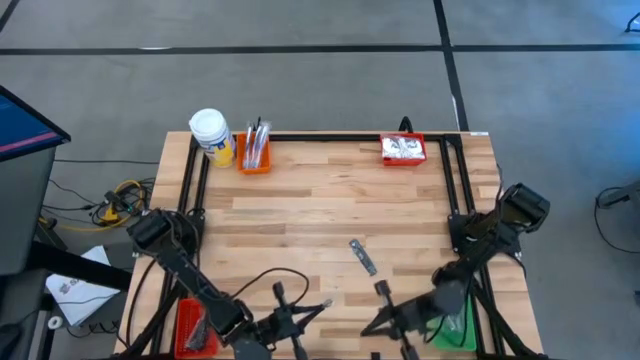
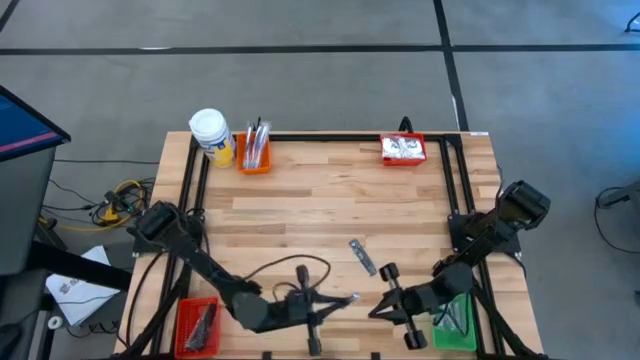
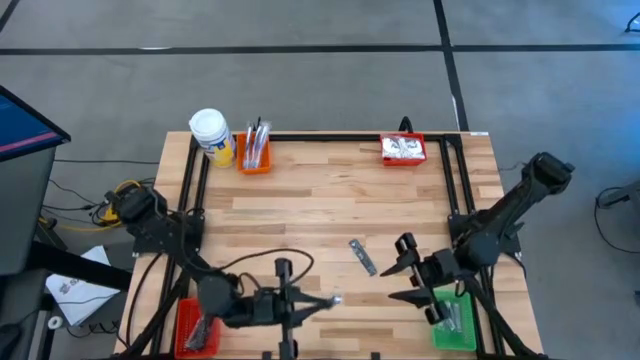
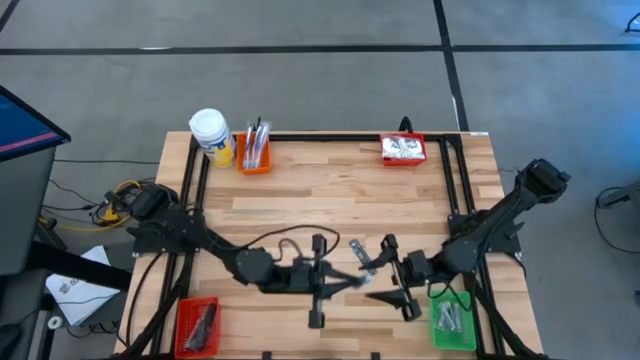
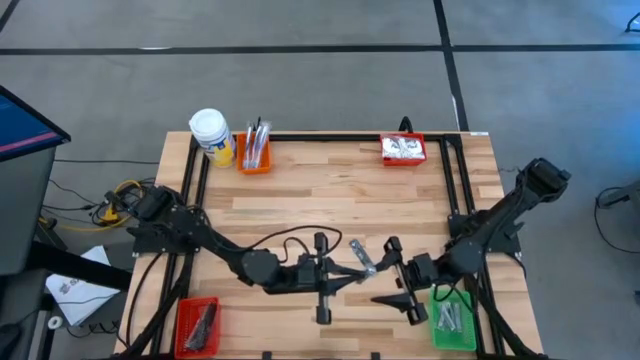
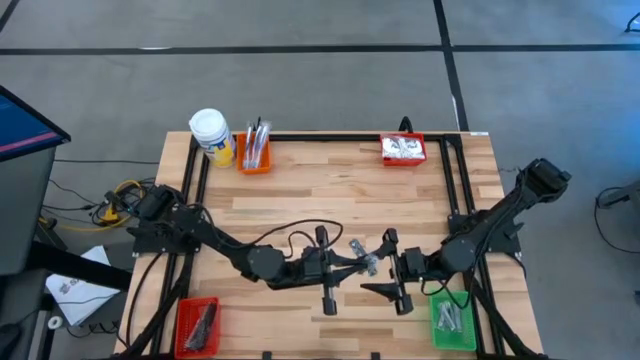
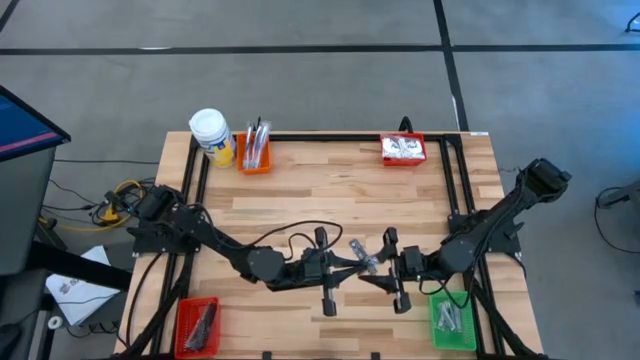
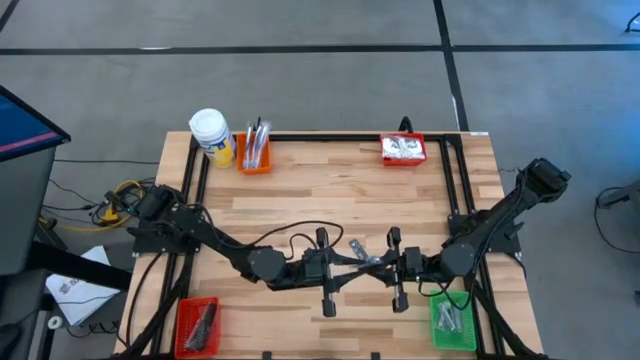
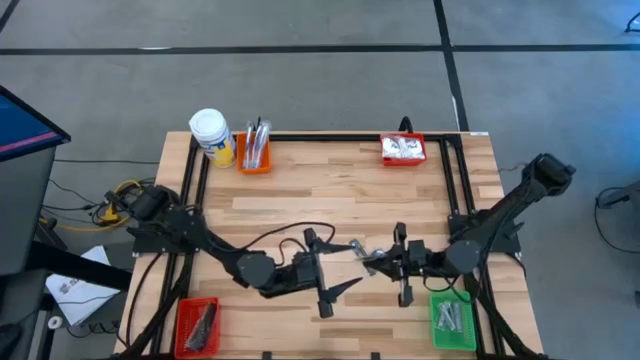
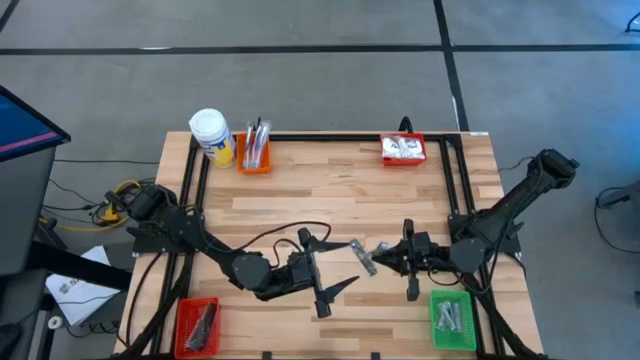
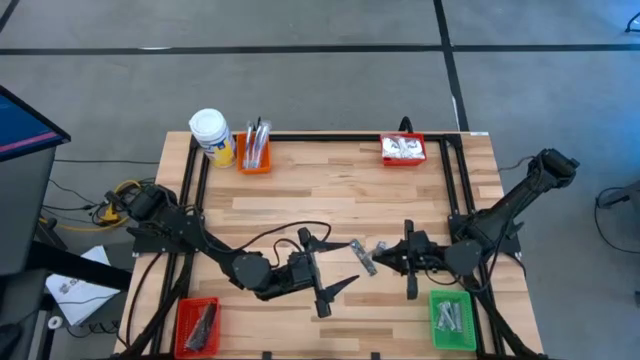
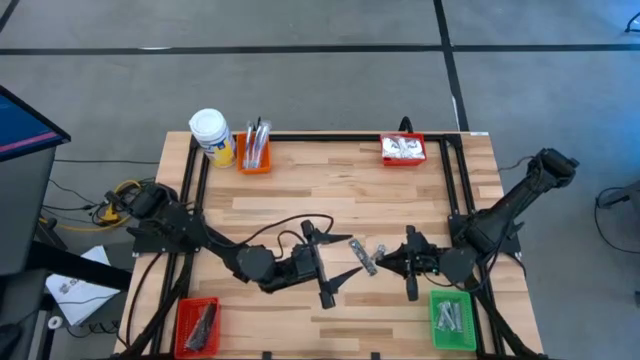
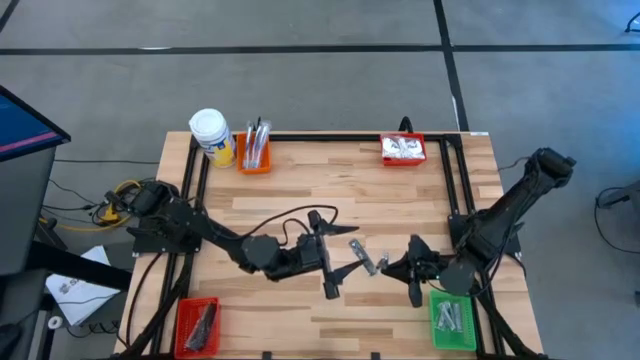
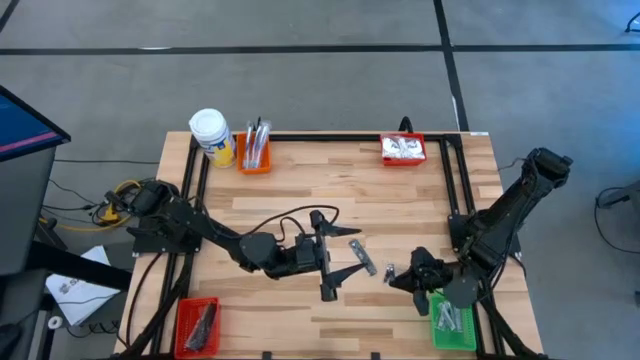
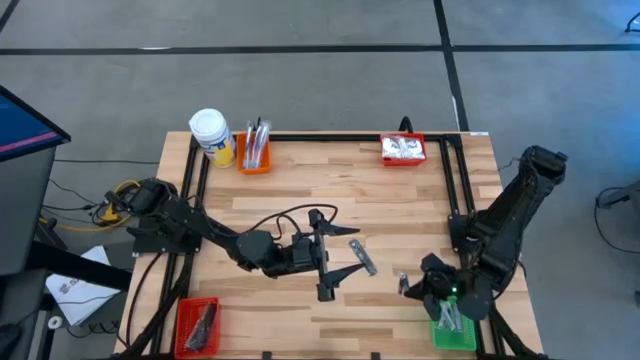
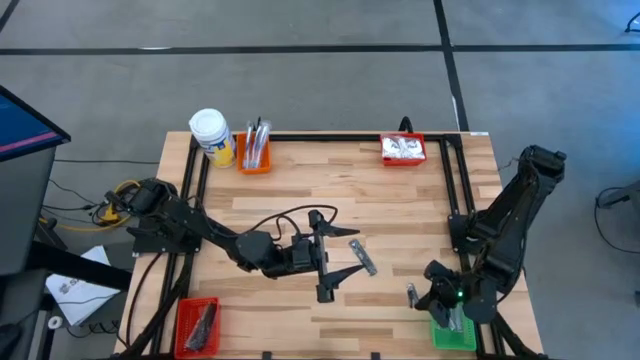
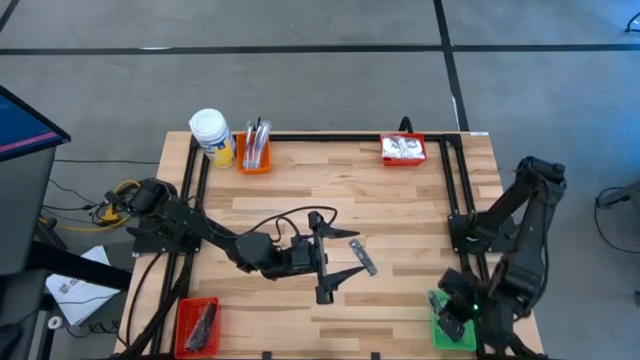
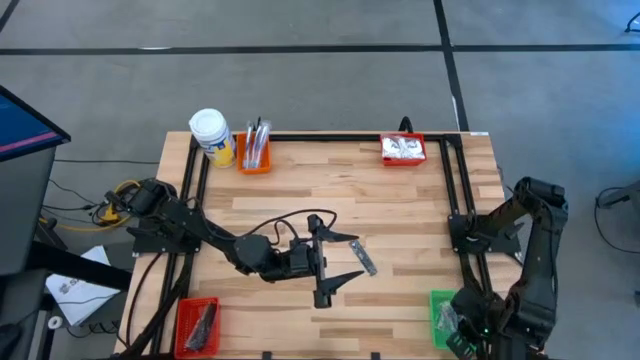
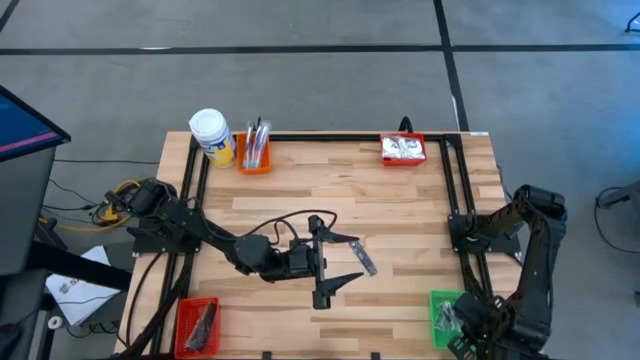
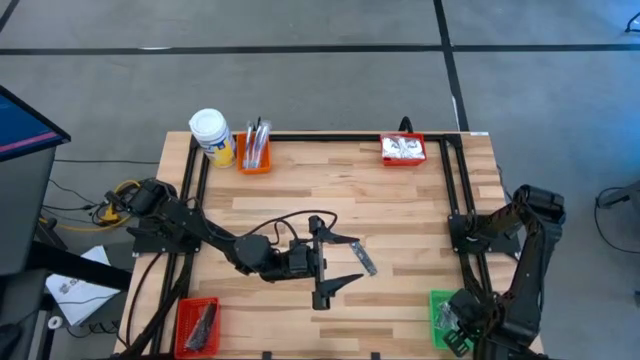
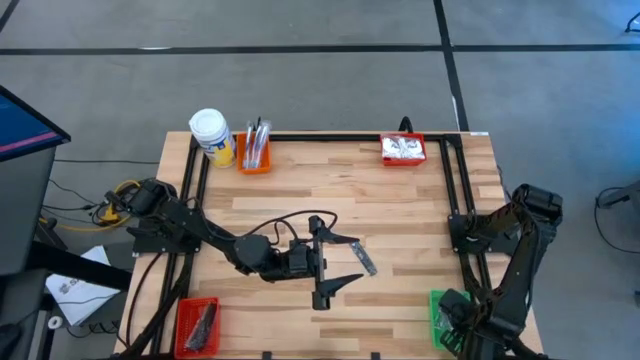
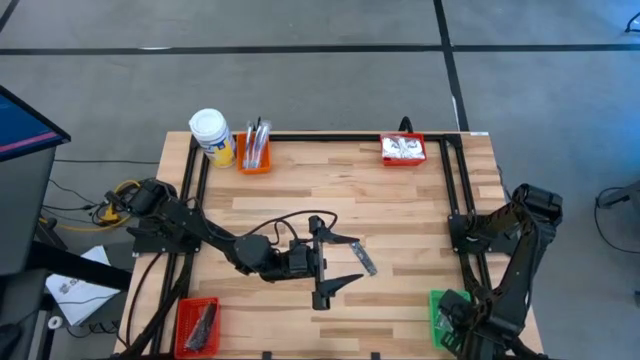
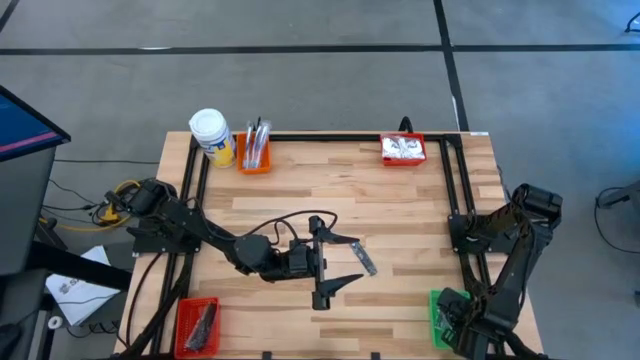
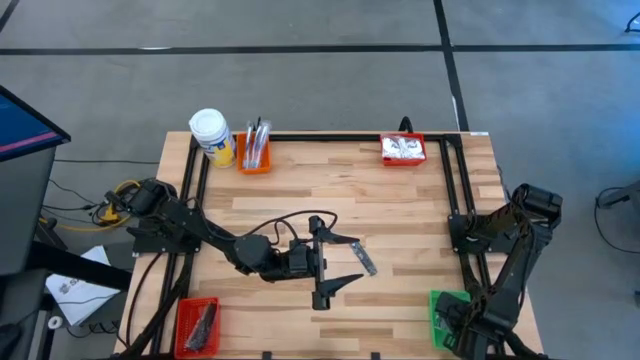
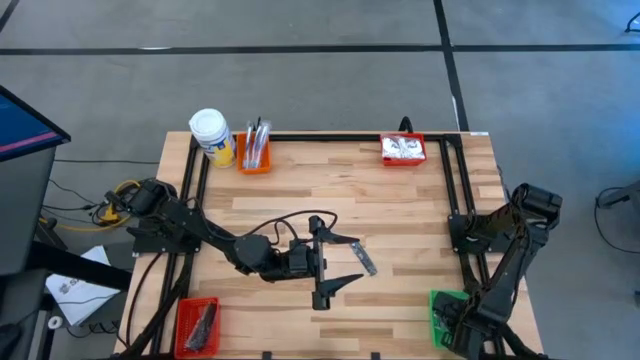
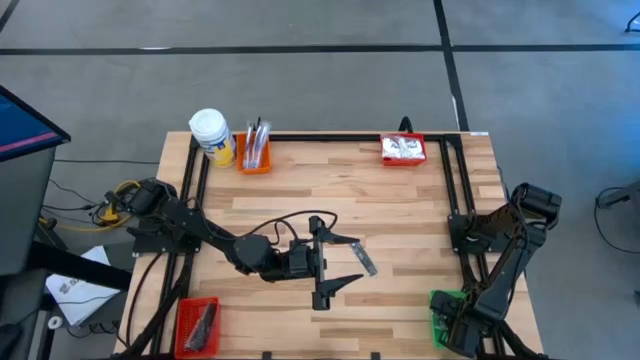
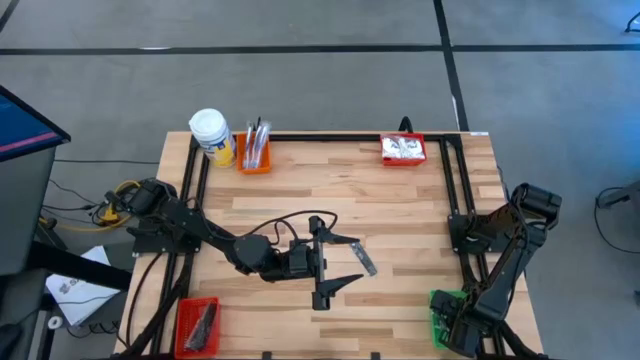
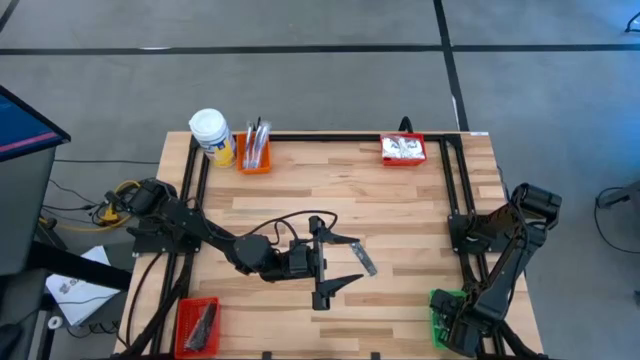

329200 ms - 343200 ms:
Task: Pick & Place Travel size toiletries
Put the nail cutter into the green bin

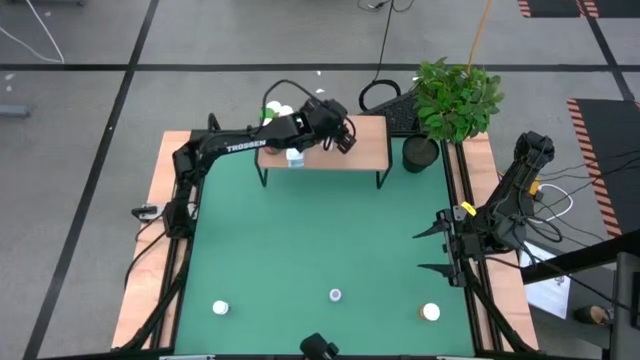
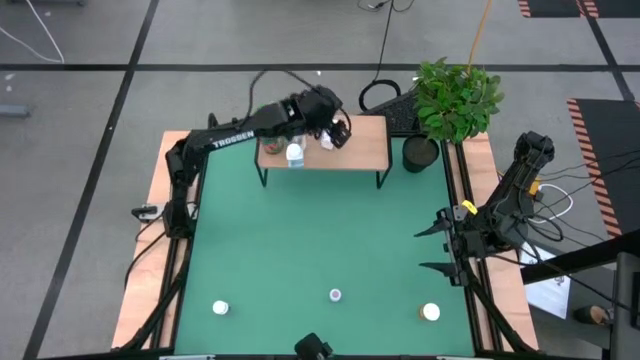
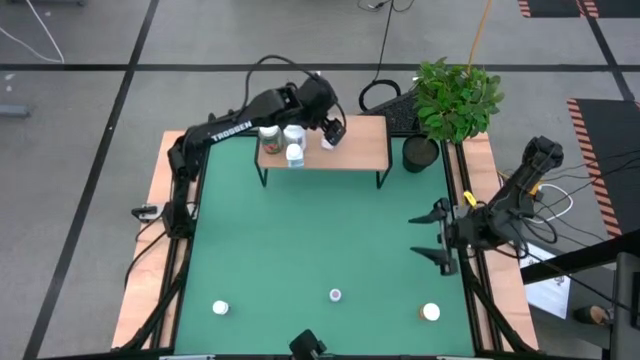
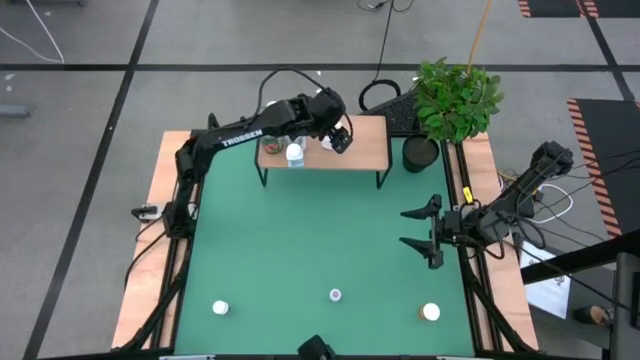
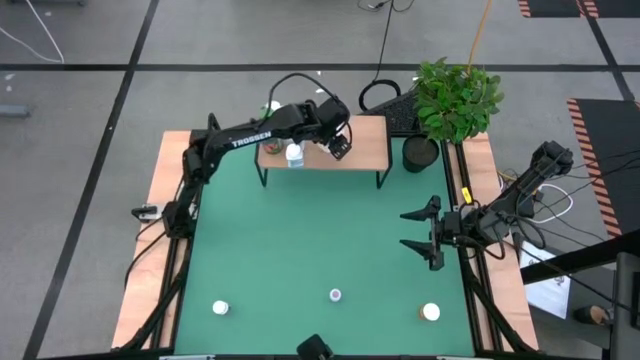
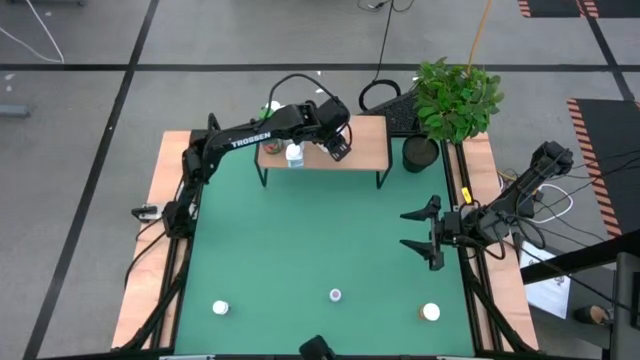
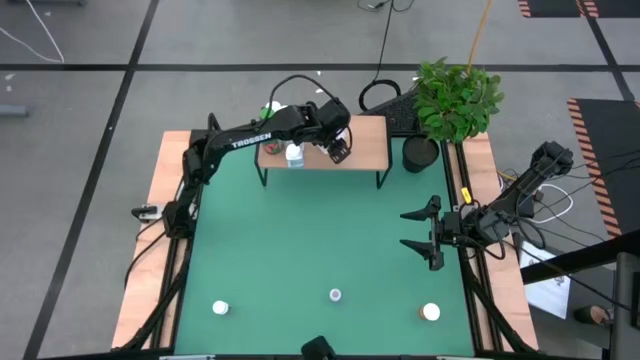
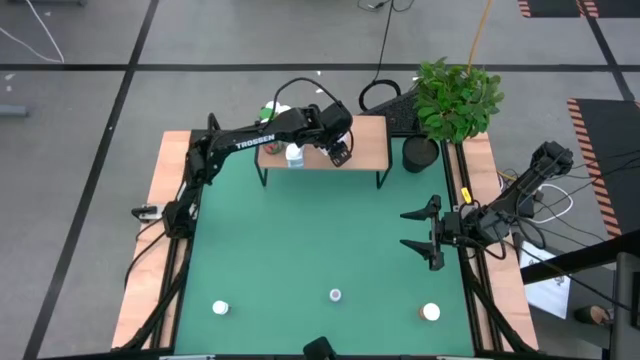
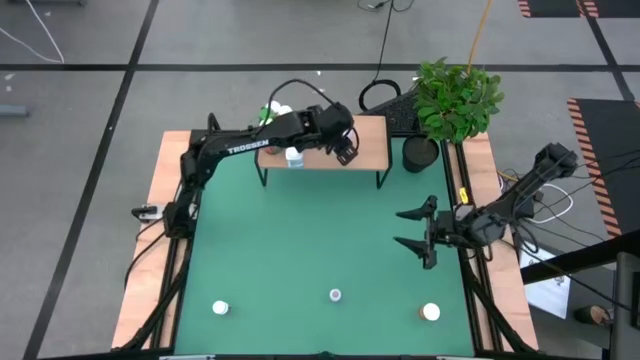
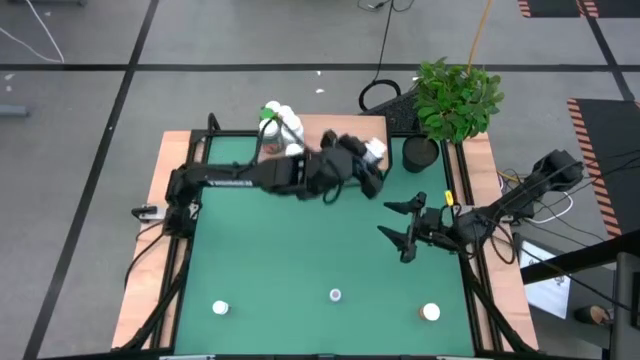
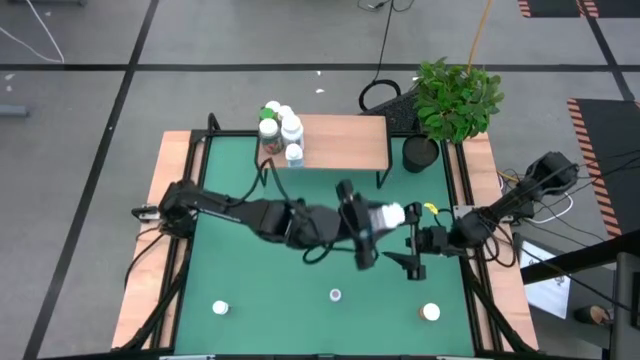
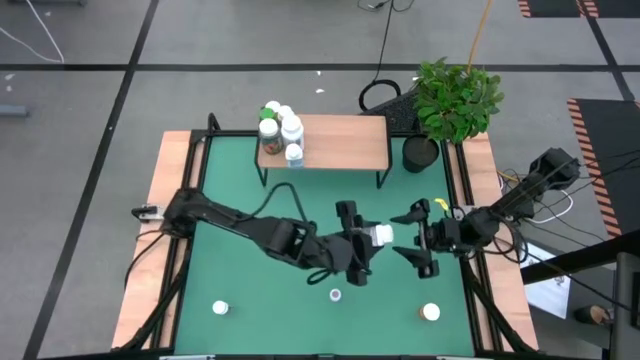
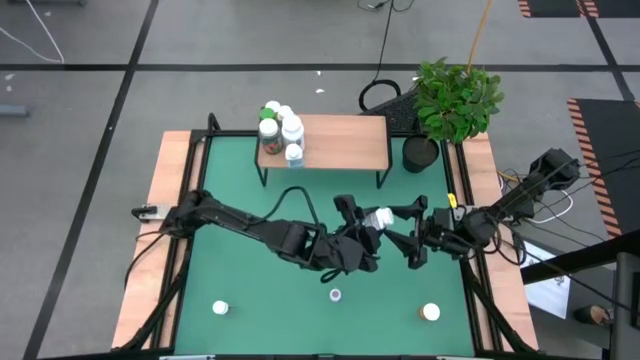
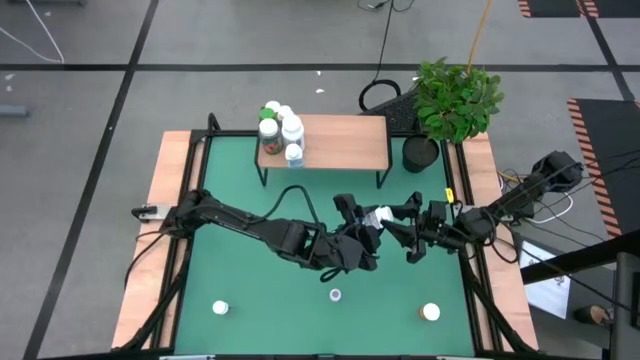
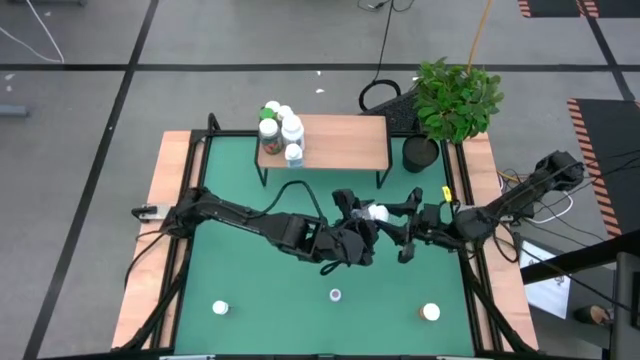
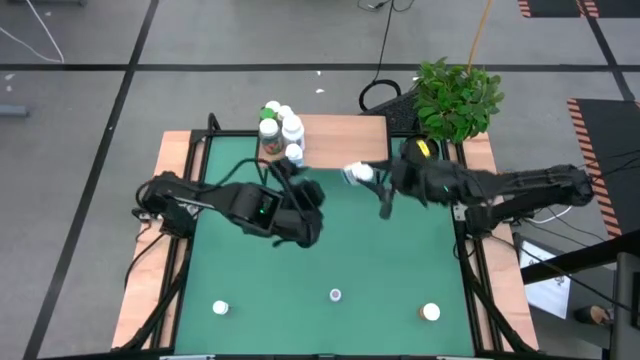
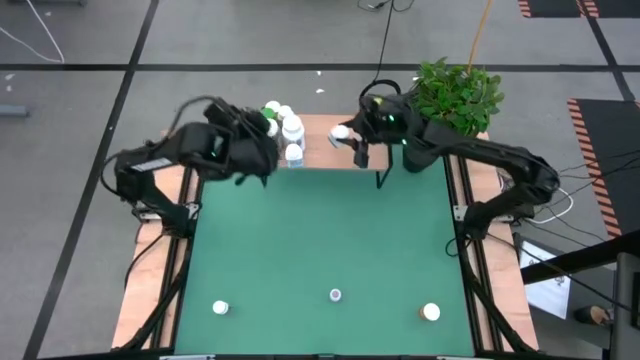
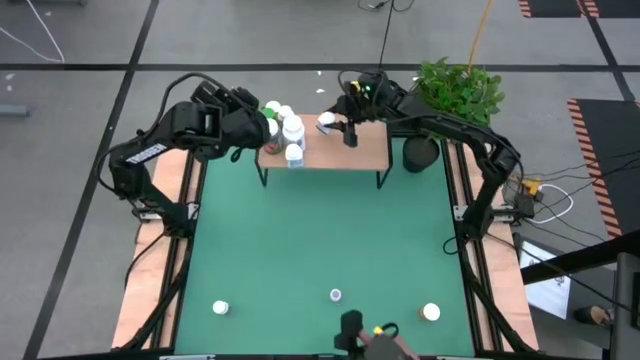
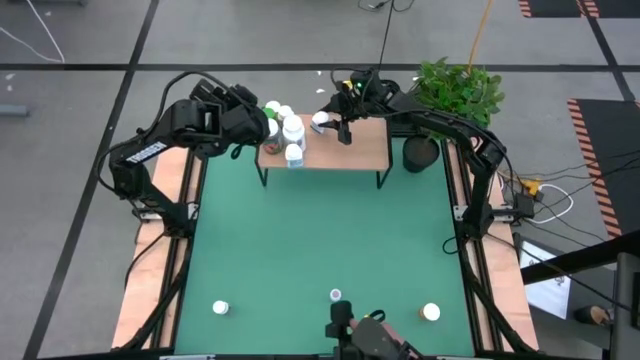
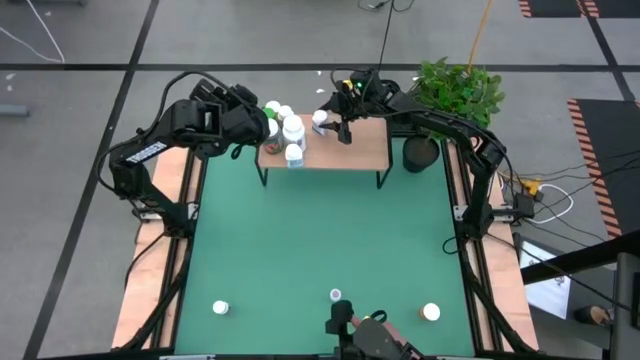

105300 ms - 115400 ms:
Task: Pick and place medicine bottles onto shelf by color
Put the blue bottle on the shelf
